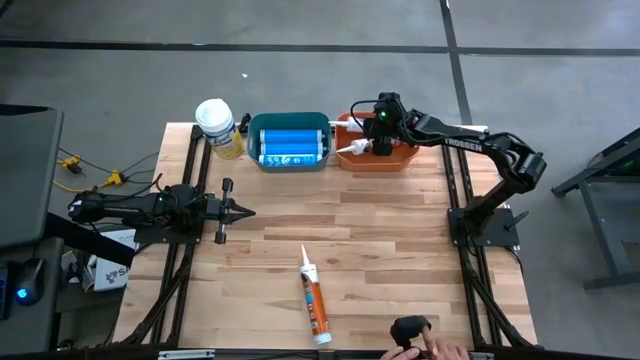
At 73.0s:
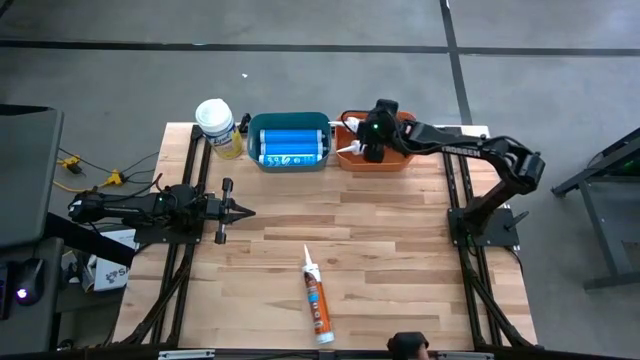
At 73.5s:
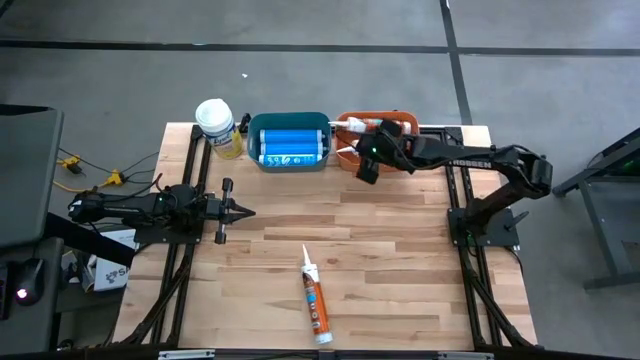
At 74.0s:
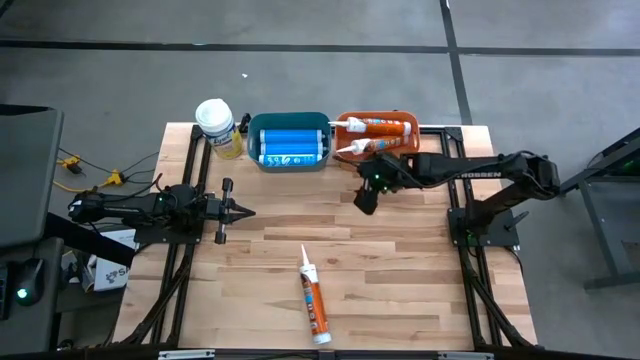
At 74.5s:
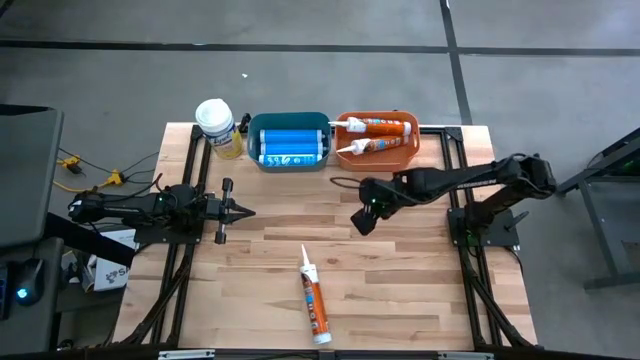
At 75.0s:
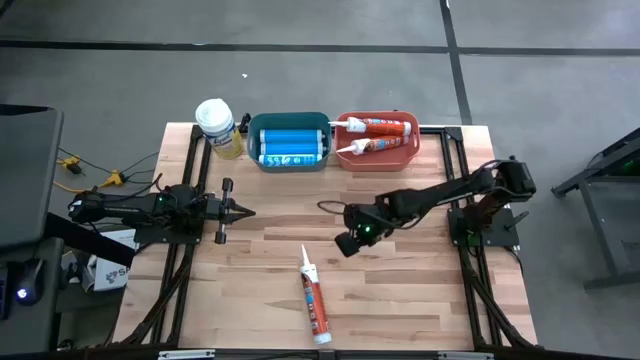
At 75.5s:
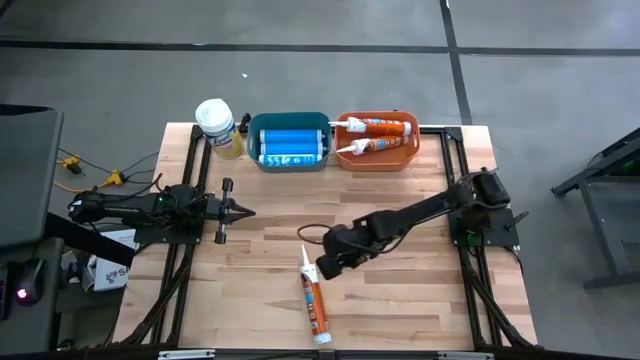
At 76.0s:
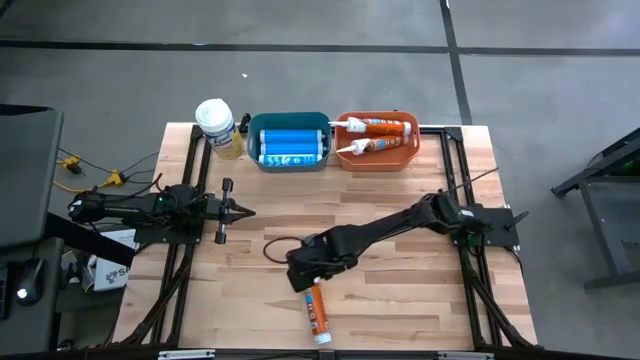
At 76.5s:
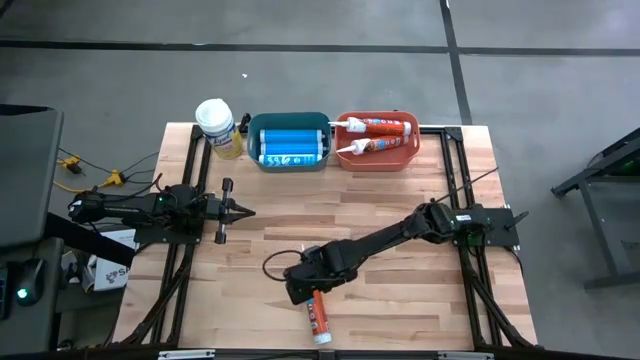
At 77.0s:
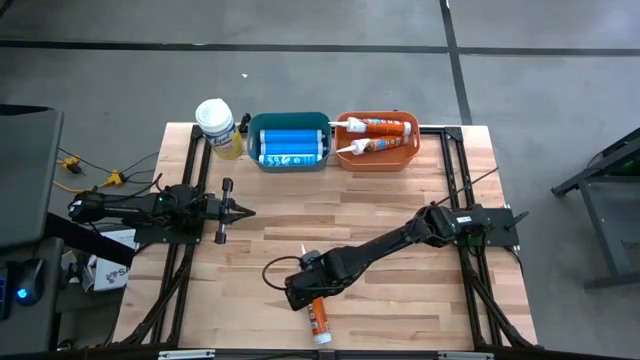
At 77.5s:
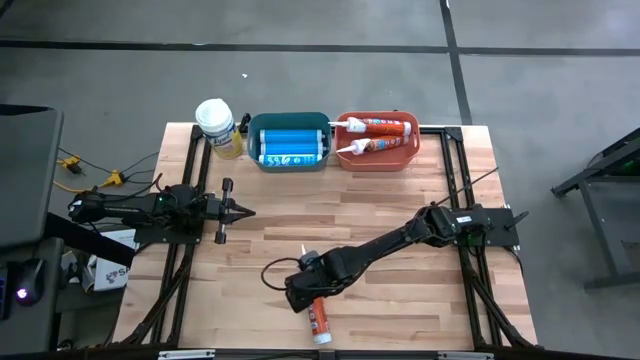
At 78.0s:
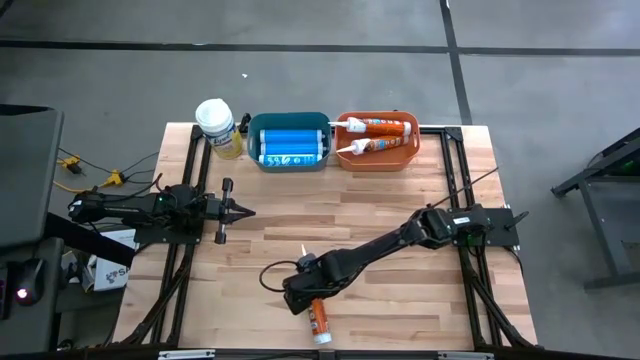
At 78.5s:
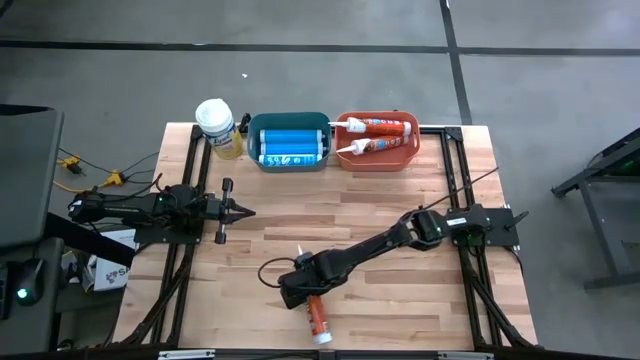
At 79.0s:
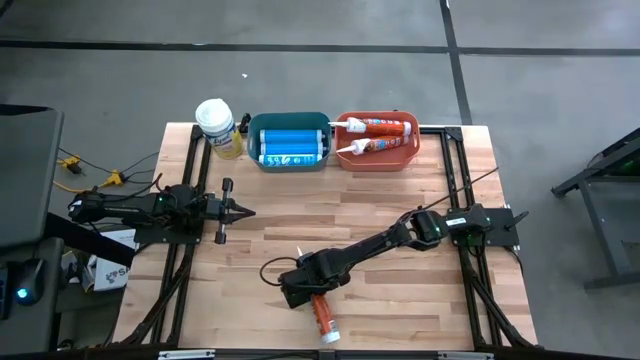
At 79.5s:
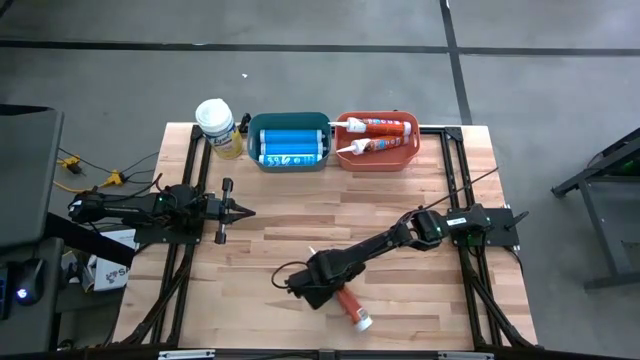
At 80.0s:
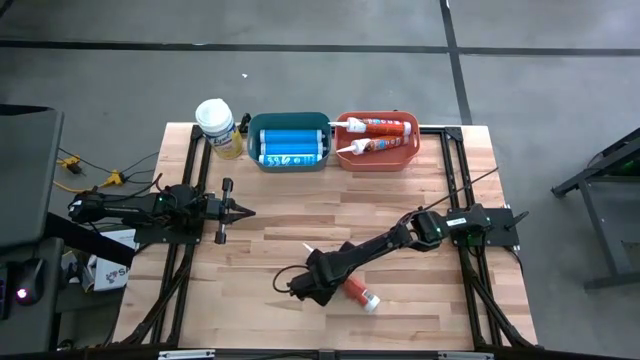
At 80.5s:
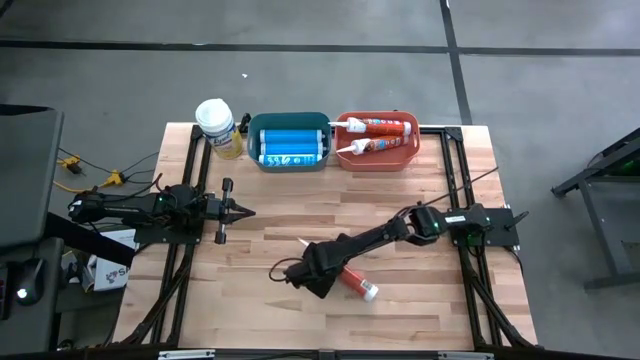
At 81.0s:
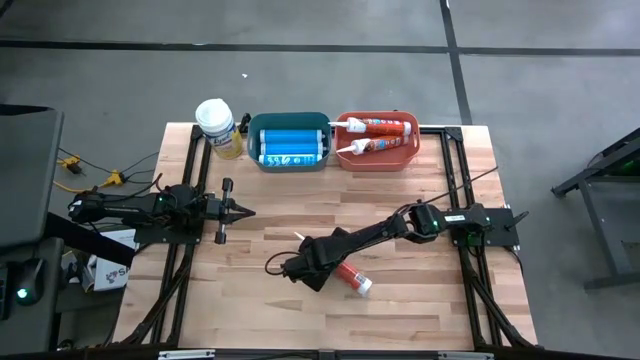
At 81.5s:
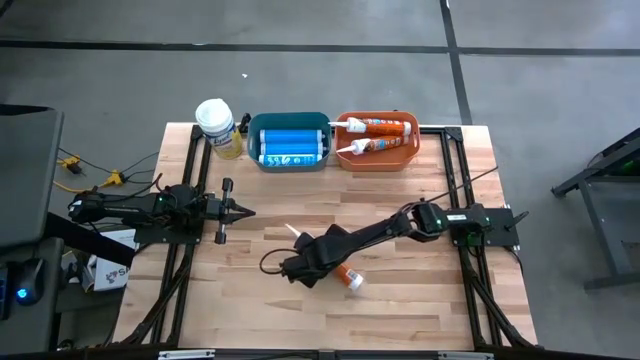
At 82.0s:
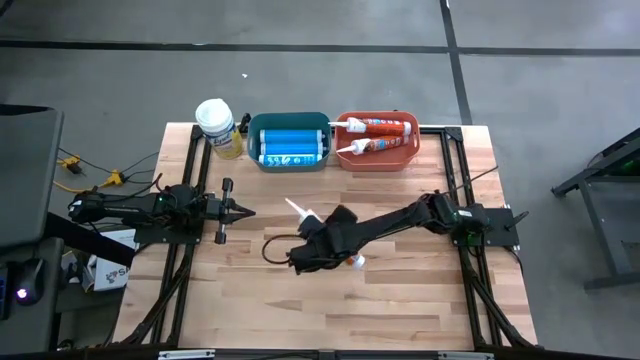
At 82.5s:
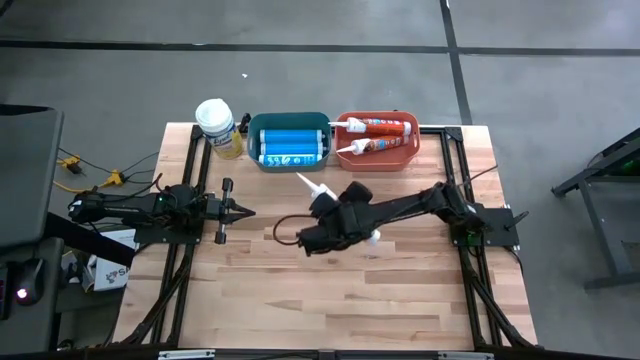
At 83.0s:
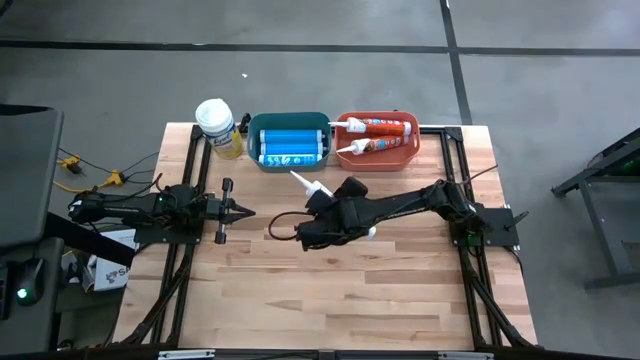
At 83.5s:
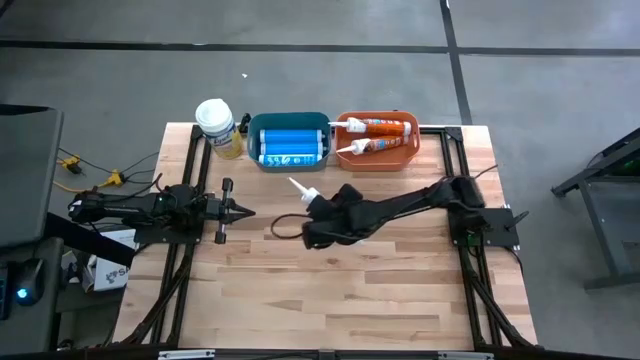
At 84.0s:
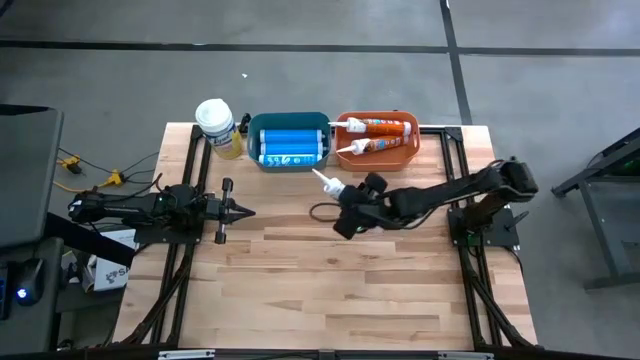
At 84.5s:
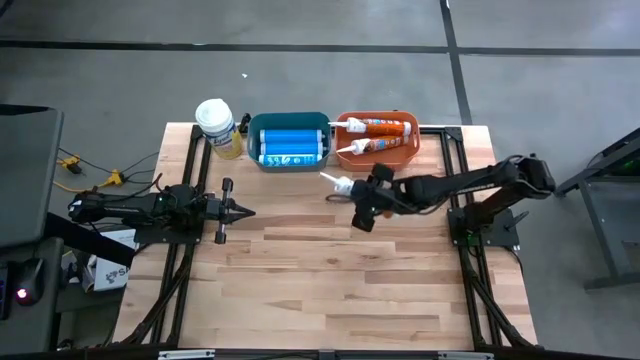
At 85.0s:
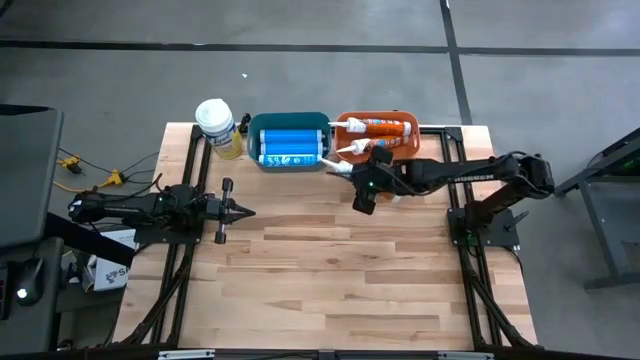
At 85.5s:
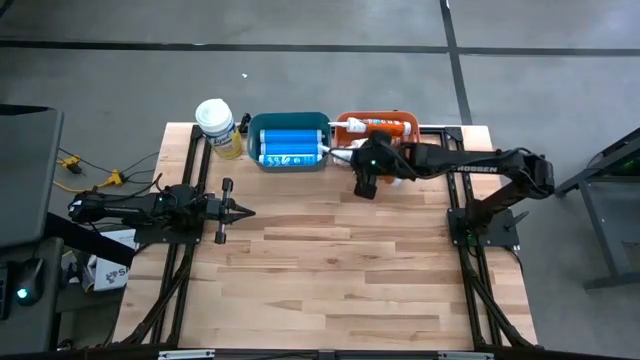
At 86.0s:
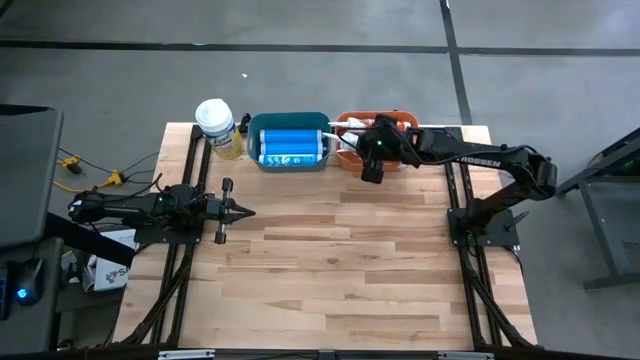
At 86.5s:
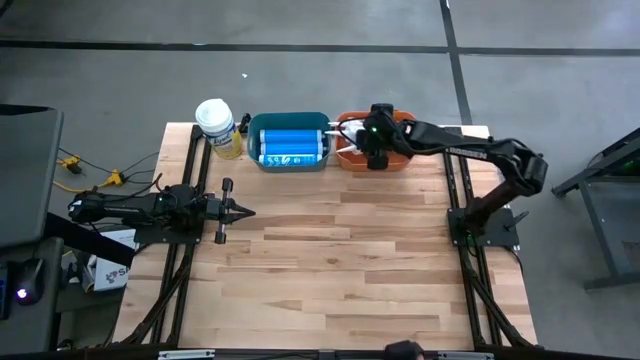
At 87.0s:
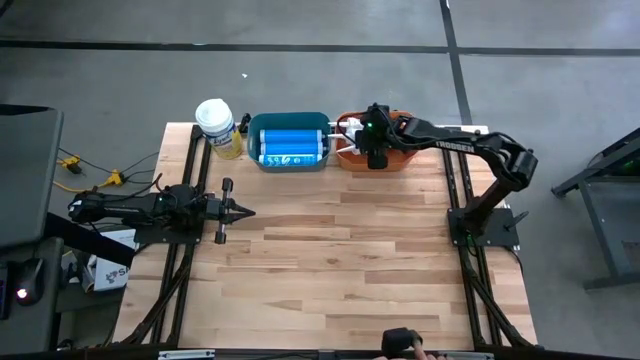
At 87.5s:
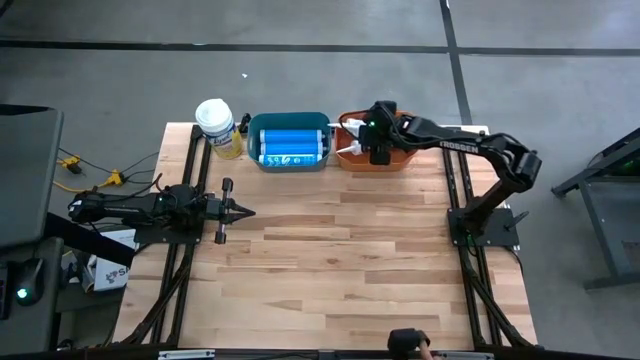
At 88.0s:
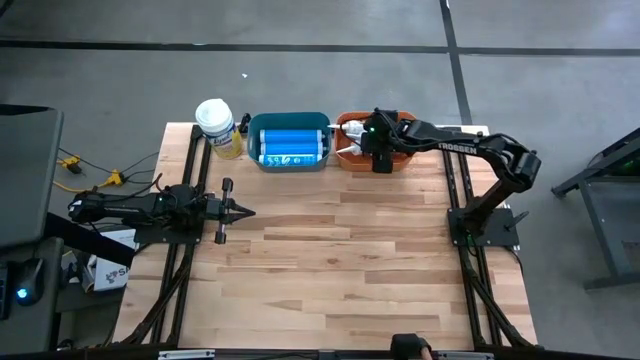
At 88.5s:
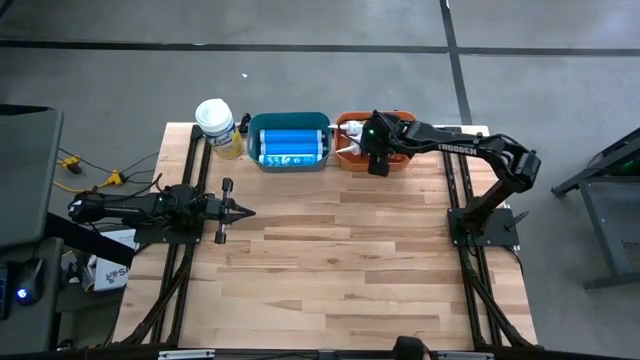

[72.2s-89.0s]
Task: Pick & place silicon tubes, Sealant and Lysol wipes
Put the orange sealant into the orange bin

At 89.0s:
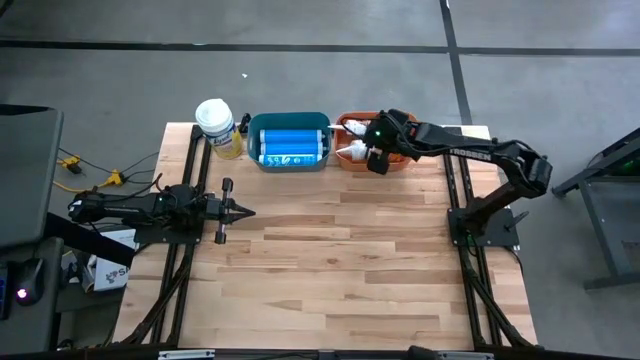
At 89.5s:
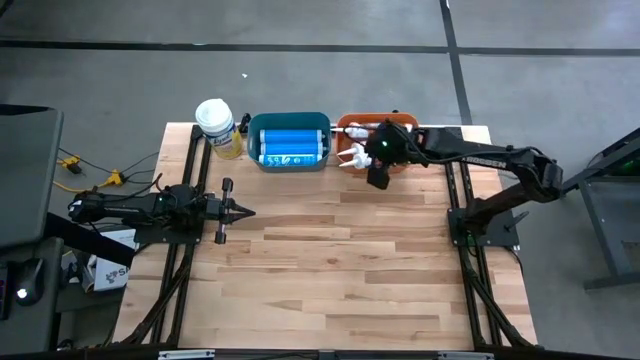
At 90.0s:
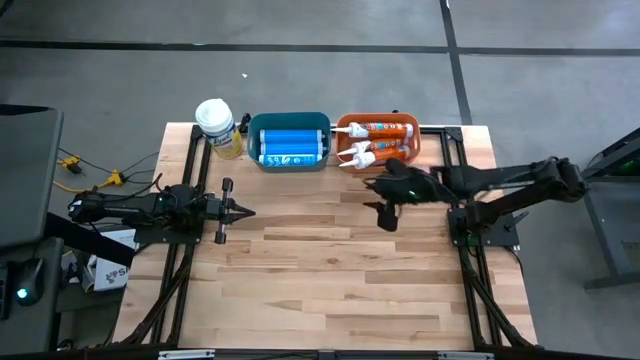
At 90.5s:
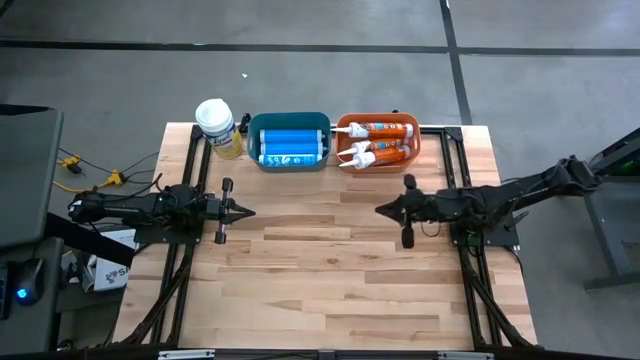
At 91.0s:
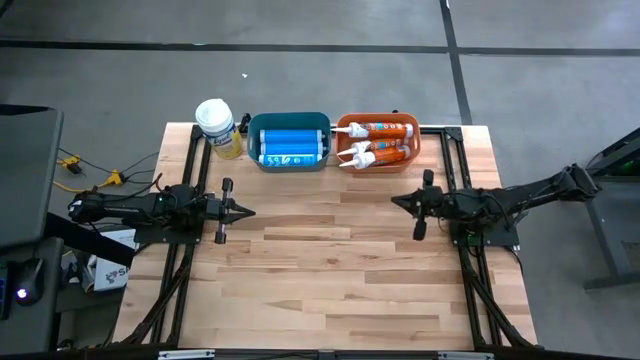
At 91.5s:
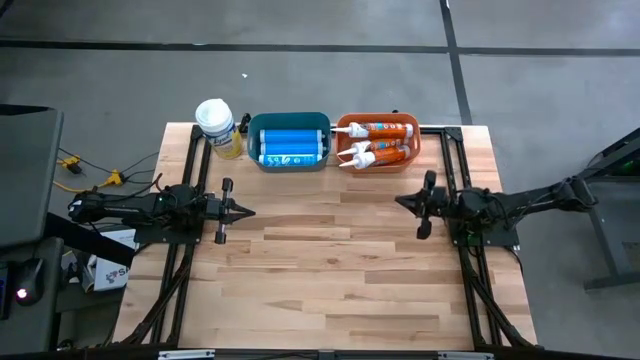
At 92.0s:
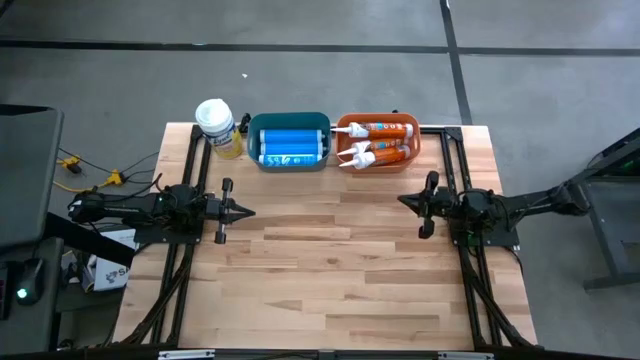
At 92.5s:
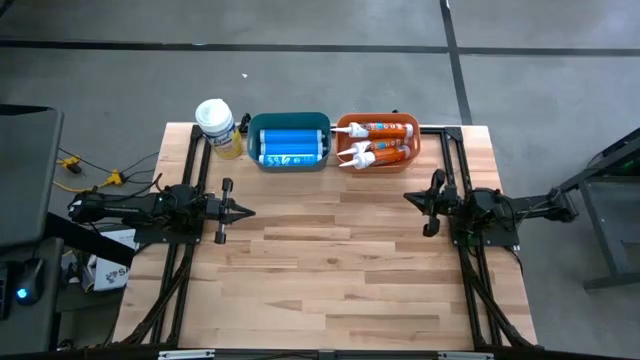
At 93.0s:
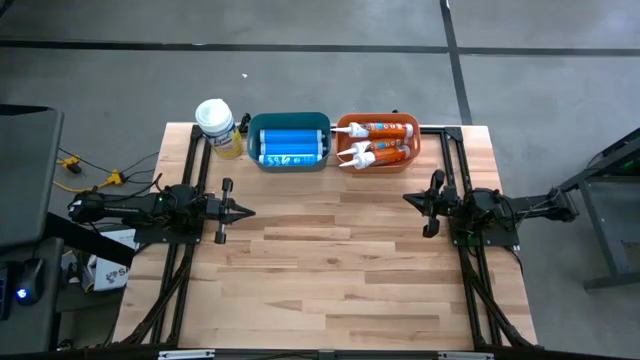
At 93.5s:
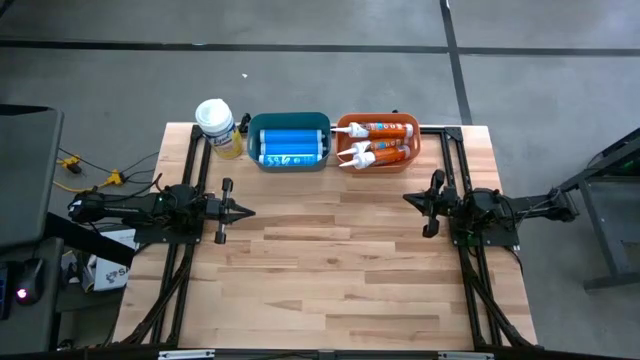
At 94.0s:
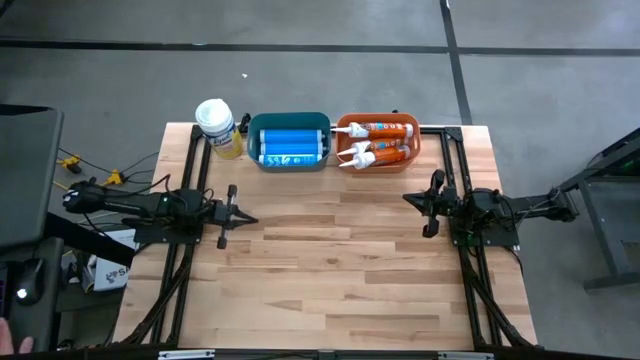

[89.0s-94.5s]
Return to Home Position
